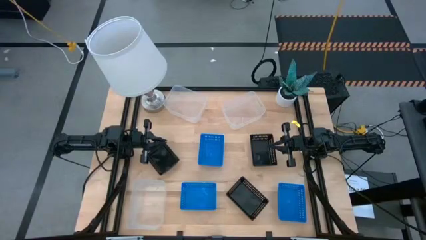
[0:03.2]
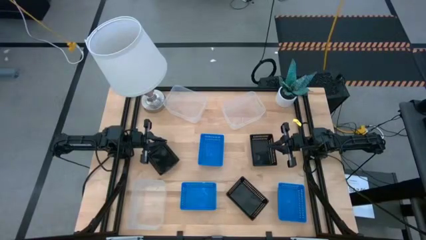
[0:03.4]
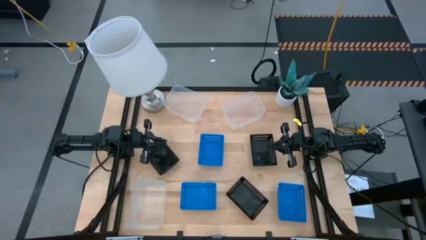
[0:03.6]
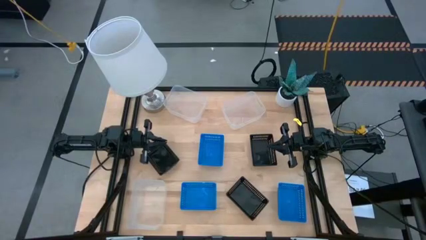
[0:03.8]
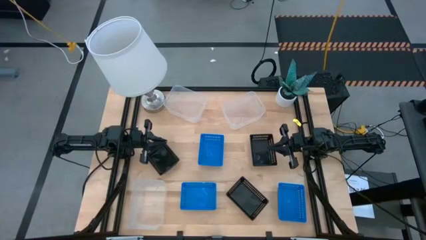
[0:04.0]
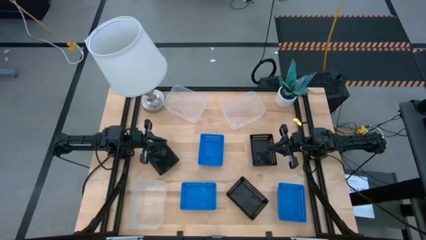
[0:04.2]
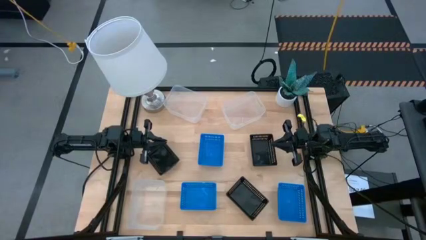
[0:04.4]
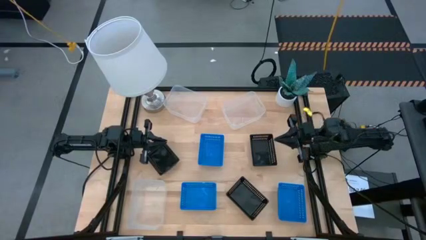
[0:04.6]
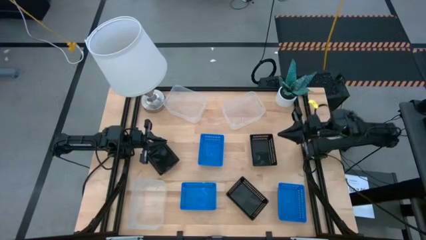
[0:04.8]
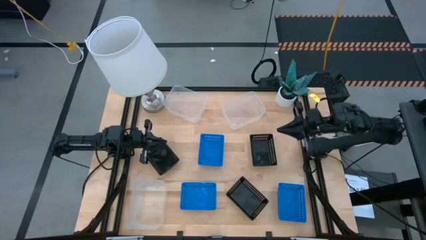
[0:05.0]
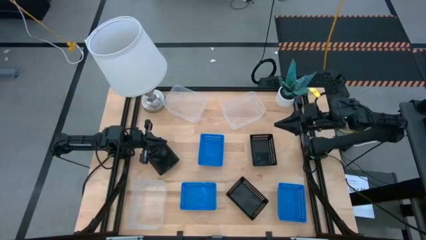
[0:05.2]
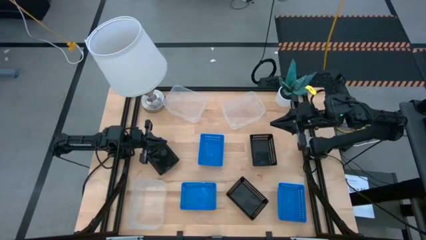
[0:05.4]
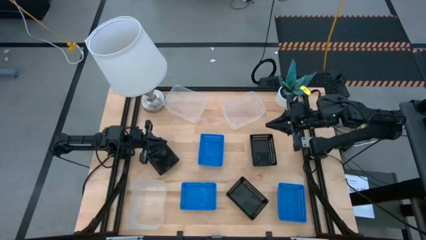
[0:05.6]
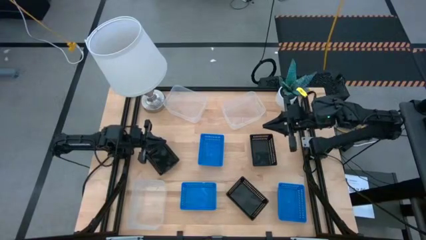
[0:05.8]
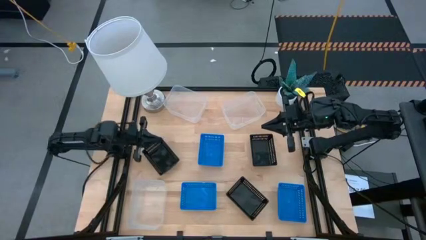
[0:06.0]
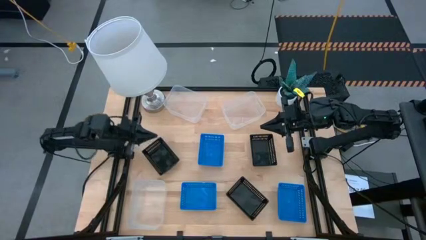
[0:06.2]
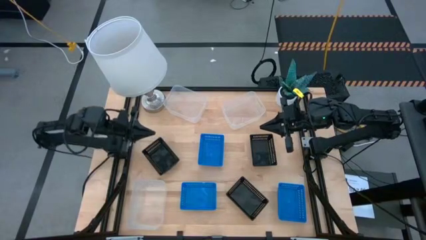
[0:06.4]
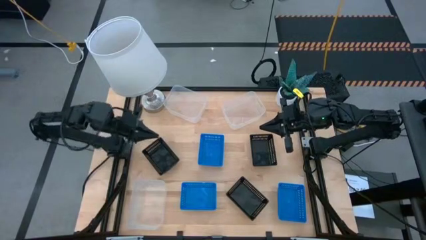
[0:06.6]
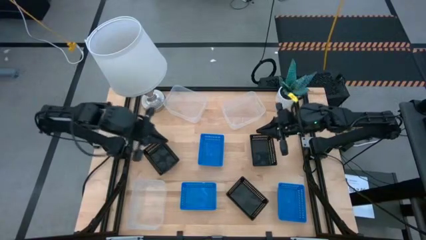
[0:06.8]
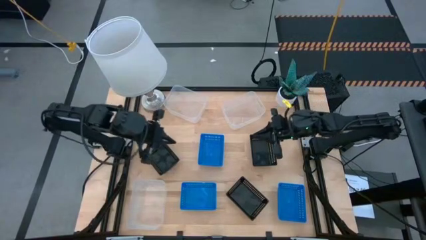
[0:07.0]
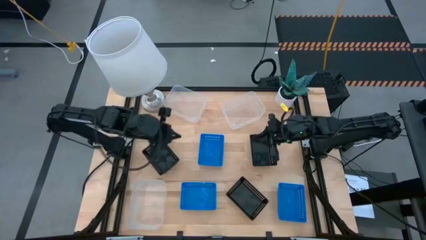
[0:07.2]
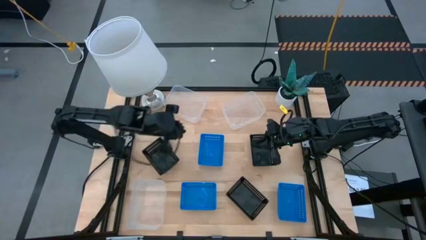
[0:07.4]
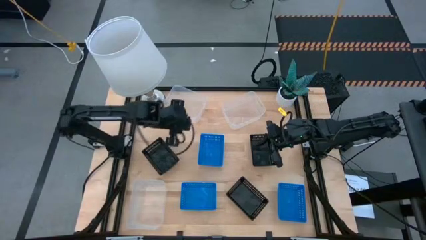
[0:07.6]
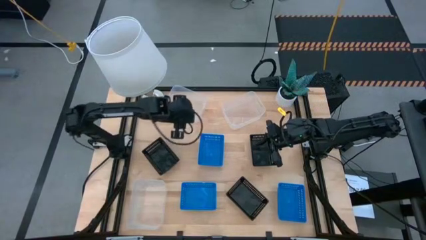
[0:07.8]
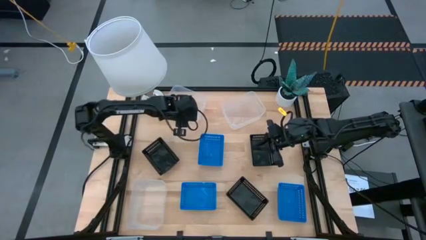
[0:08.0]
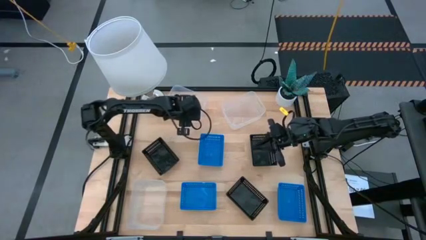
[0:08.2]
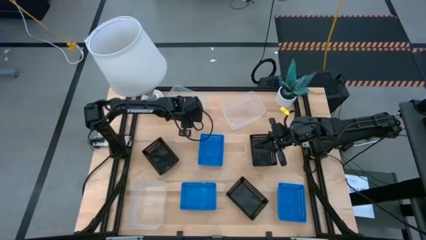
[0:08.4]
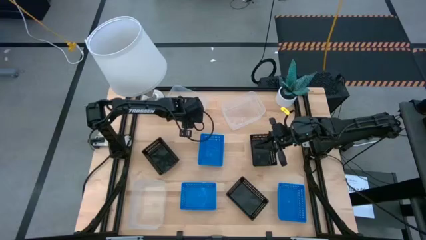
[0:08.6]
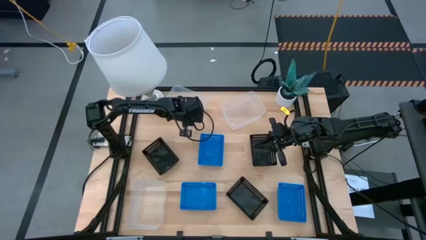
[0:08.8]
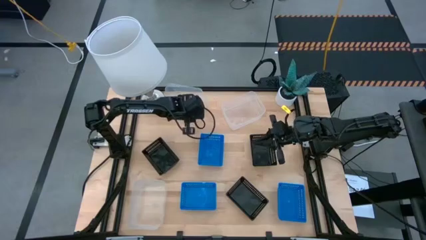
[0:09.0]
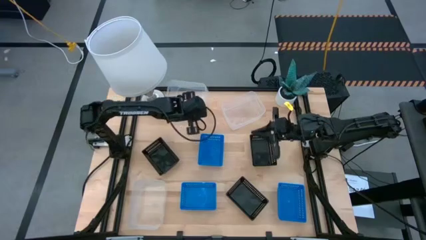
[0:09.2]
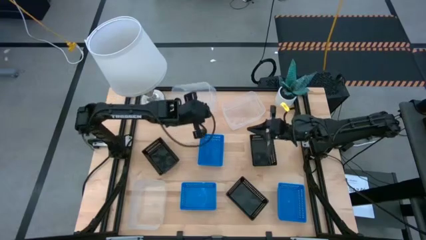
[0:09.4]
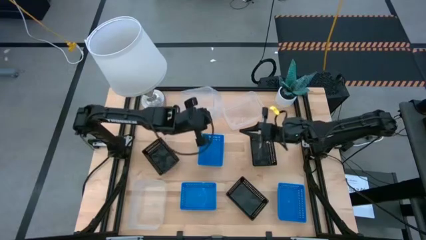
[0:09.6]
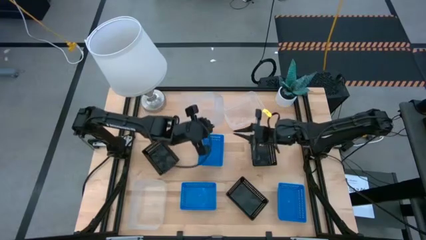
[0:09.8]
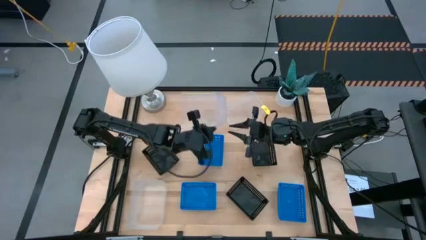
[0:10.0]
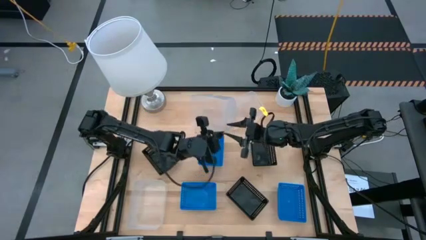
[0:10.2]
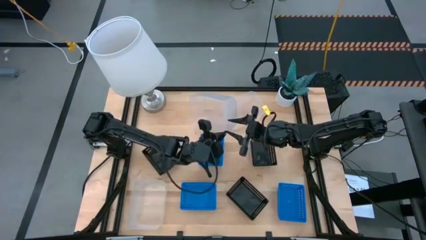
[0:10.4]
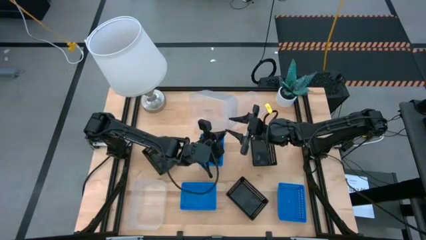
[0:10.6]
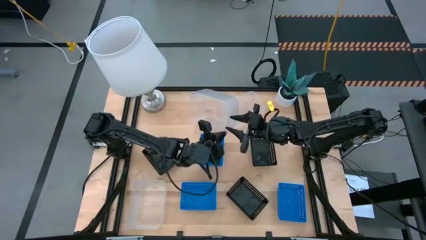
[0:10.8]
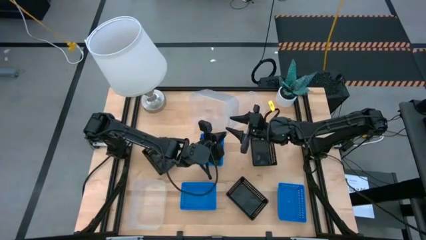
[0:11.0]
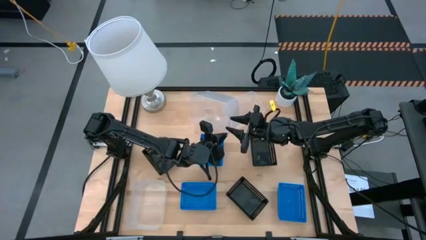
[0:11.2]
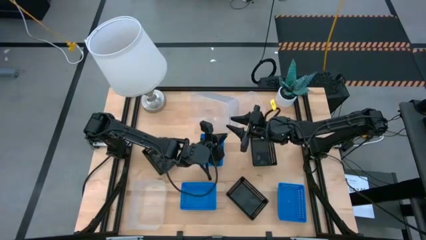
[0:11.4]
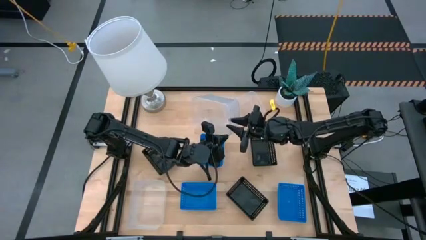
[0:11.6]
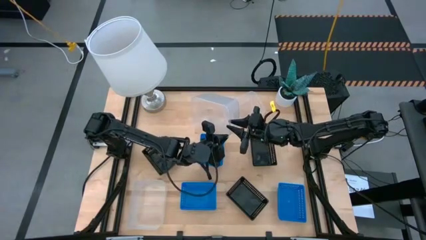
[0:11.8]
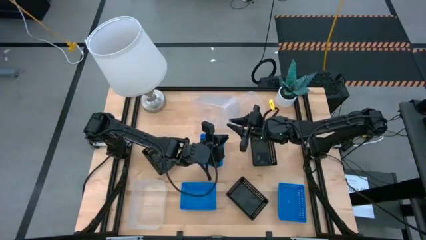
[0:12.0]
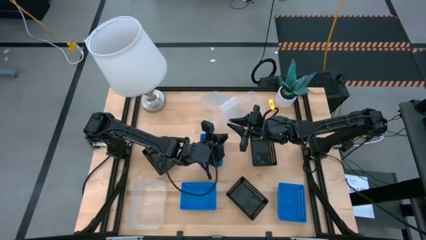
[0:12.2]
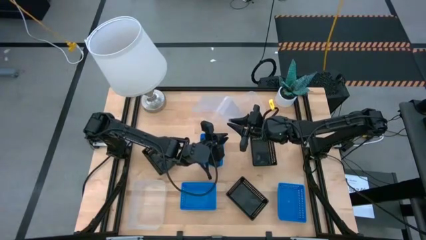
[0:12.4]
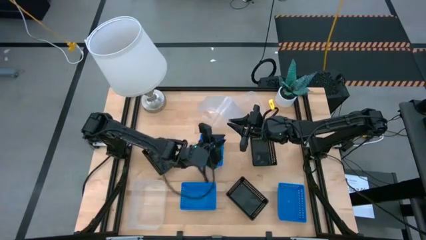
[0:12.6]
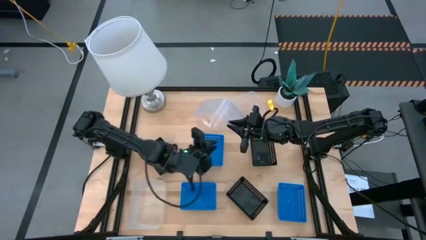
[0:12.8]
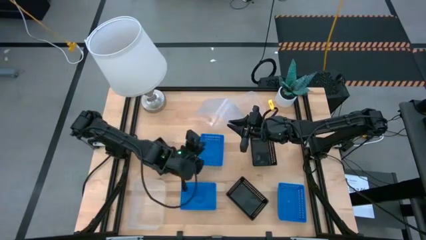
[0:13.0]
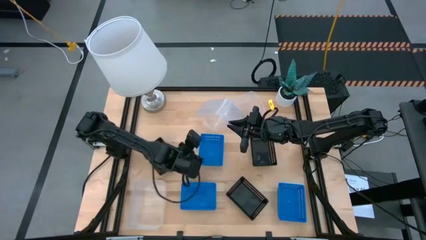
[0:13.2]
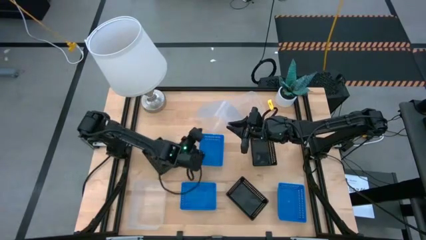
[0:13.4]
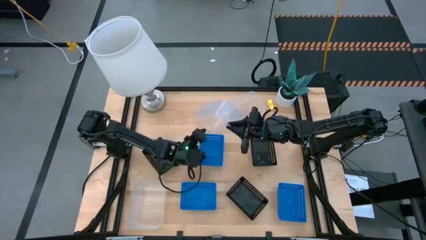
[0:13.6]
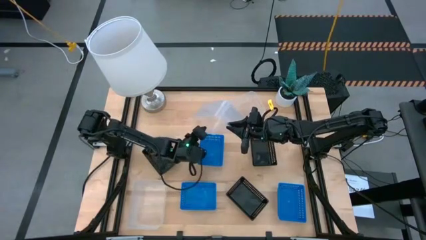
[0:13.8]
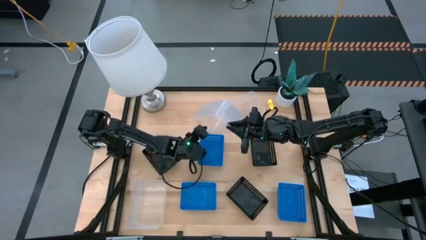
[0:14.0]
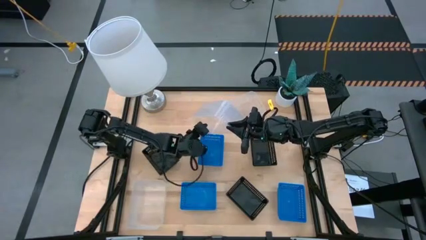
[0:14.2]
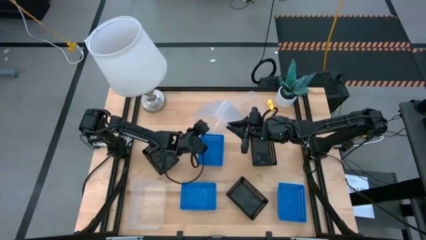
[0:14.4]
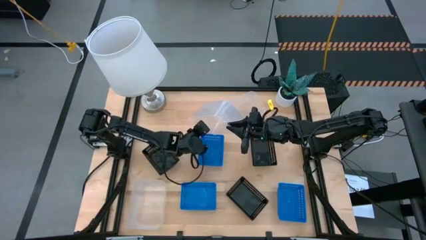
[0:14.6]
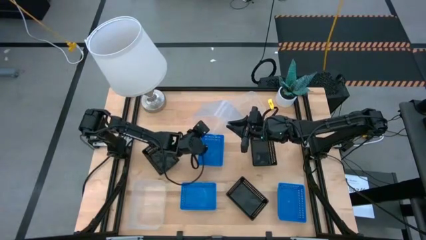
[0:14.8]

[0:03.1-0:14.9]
Stack the top left transparent bin on the bottom transparent bin
